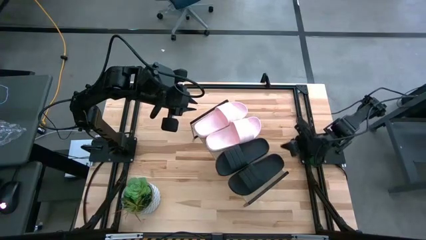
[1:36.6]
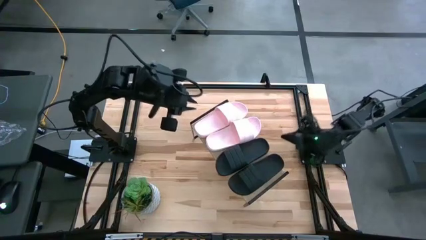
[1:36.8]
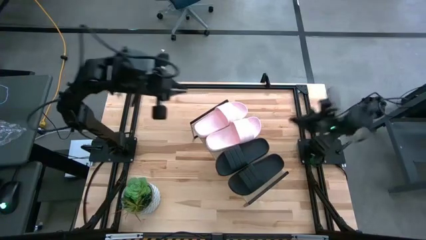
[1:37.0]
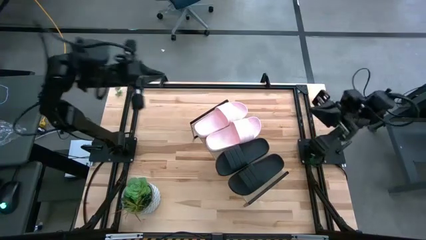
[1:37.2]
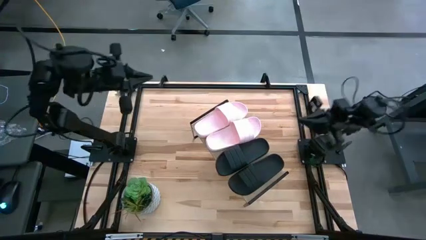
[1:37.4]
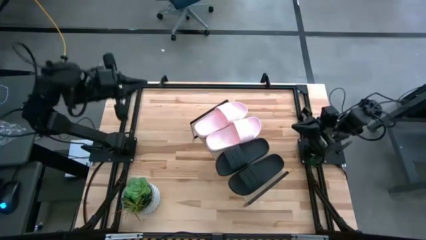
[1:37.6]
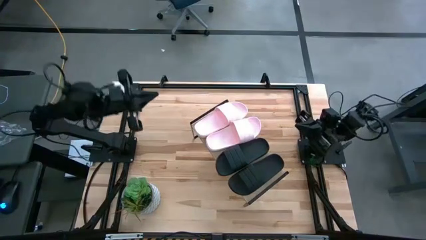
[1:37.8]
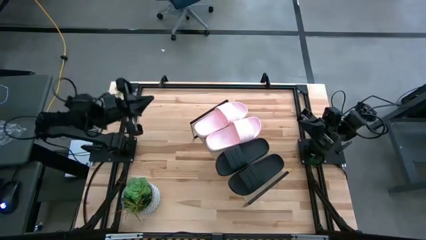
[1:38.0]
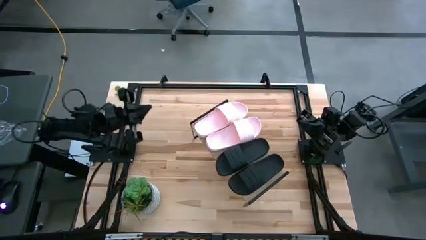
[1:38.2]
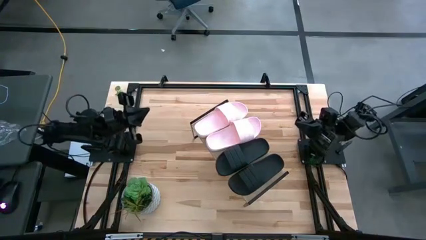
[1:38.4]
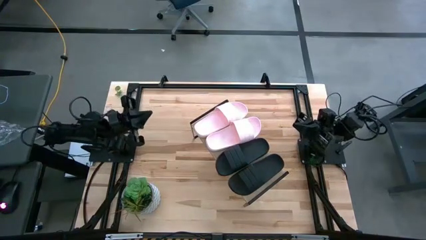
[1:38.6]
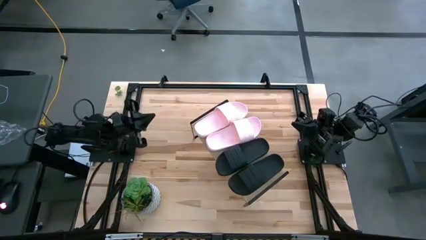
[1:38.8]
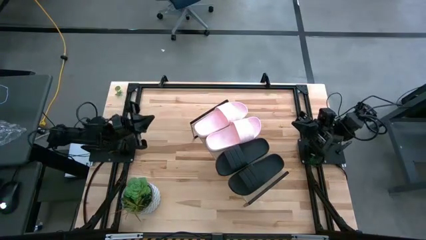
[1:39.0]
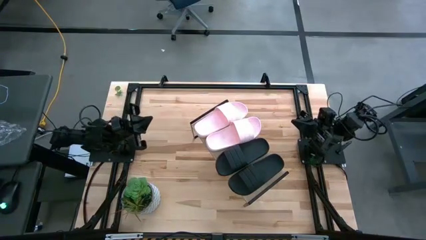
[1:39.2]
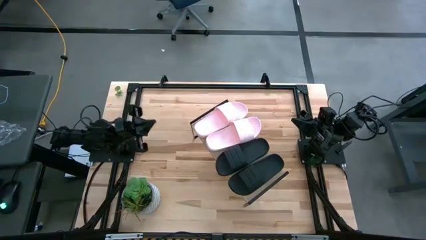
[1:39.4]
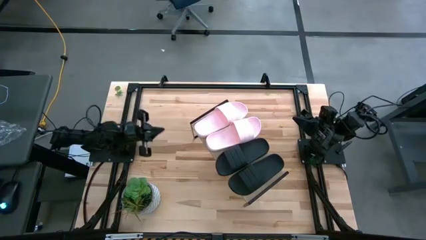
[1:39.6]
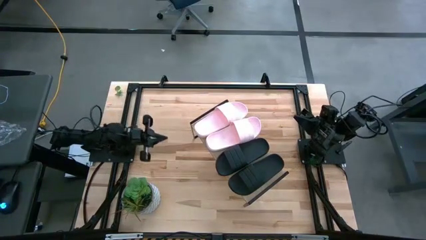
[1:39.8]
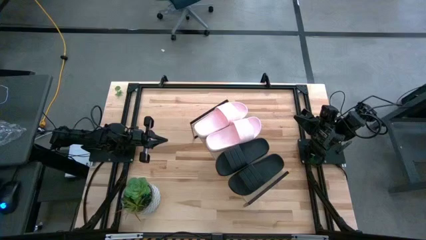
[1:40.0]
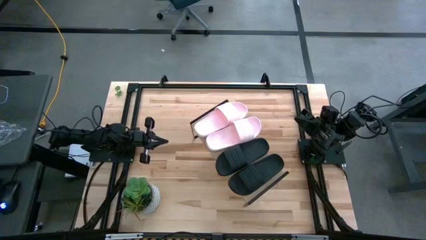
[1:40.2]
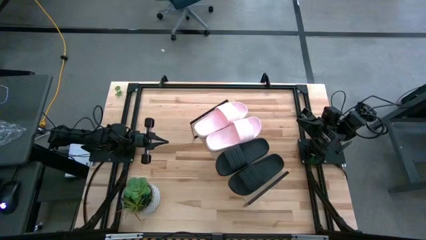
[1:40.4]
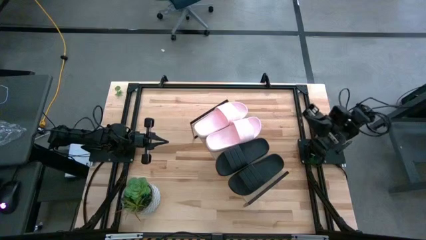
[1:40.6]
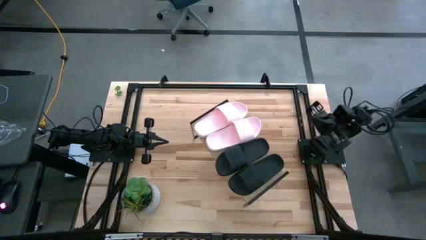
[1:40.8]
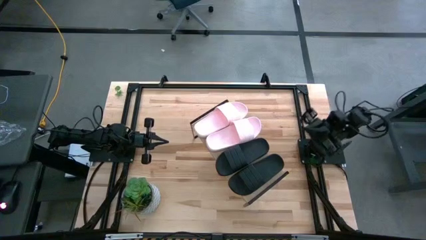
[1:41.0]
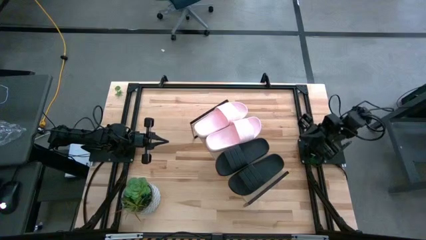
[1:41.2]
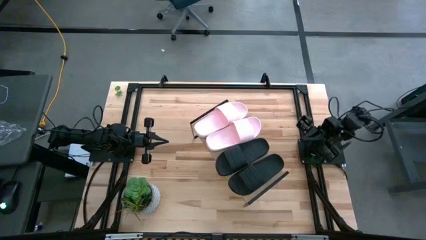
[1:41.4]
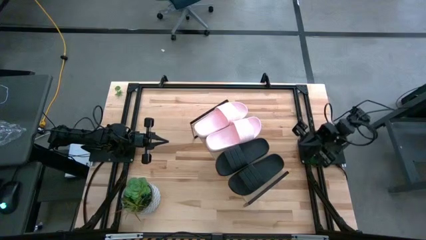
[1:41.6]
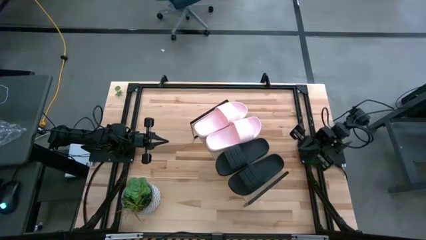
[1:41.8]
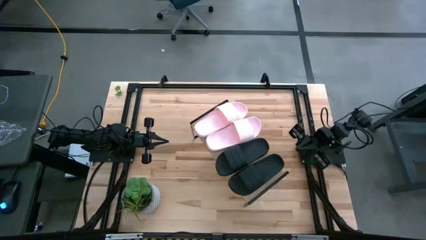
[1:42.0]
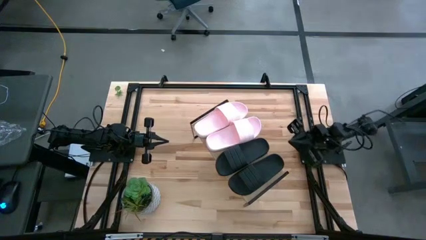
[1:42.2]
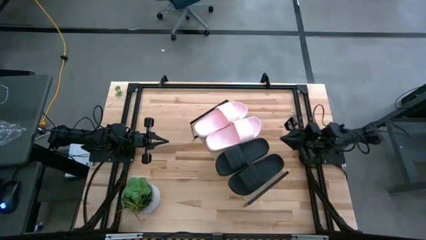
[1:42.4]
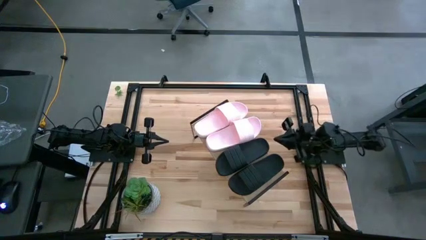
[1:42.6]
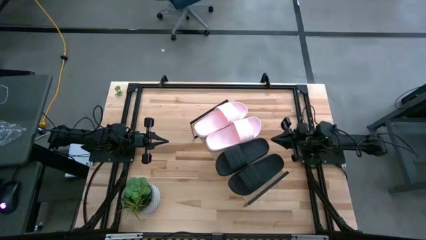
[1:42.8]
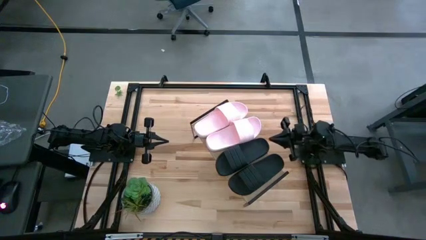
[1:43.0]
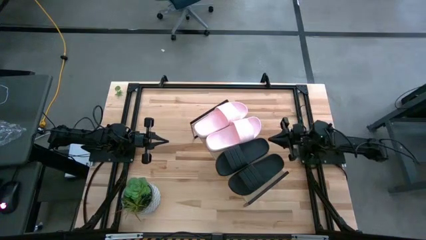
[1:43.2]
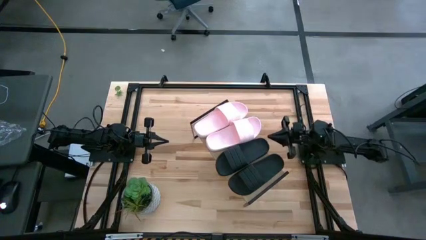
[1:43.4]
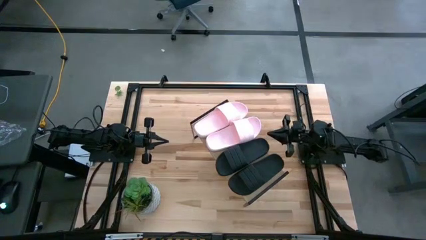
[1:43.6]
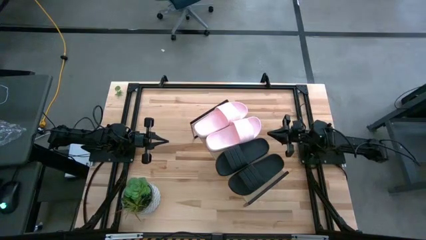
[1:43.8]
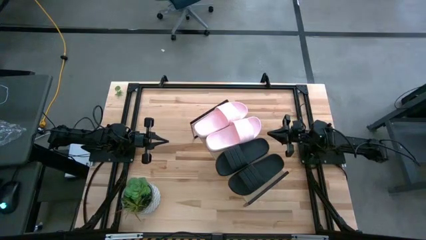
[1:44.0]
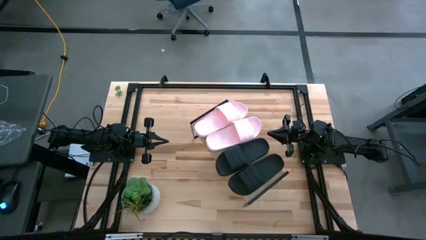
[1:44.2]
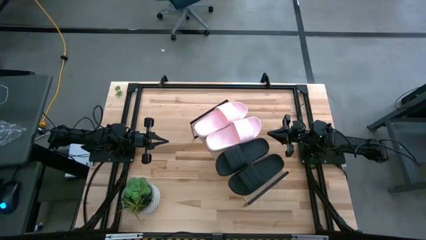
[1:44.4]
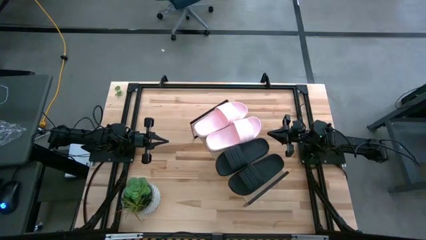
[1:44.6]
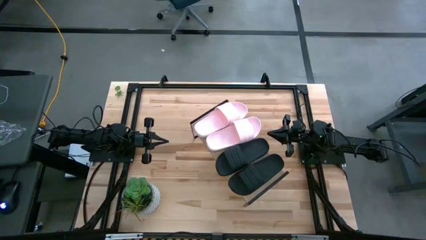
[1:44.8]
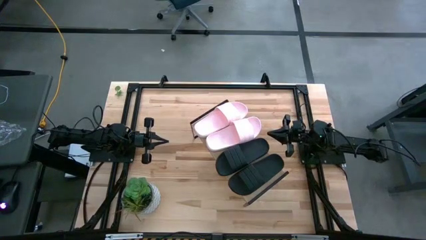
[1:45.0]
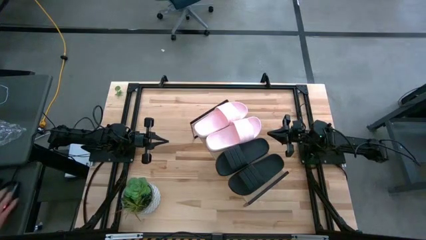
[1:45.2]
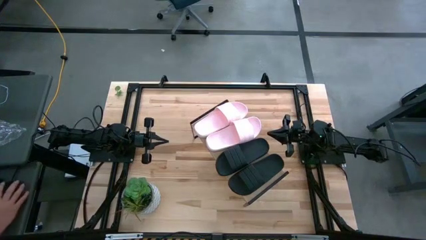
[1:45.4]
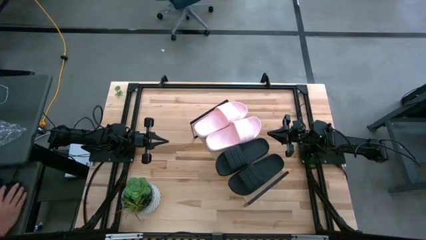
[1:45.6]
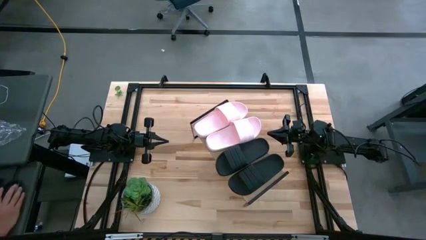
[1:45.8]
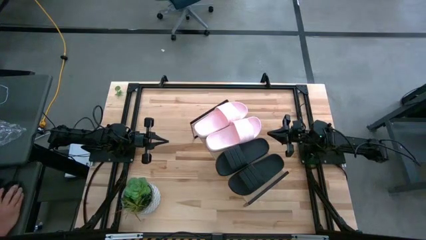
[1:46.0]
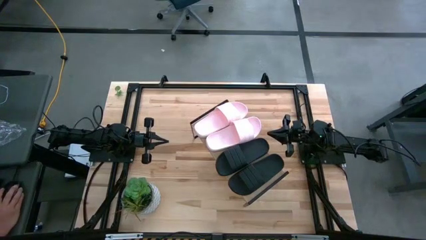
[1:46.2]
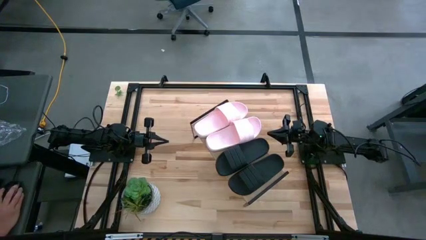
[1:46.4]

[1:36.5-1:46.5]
Task: Pick and place slides into the shelf
Return to Home Position

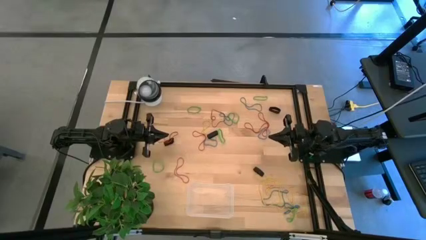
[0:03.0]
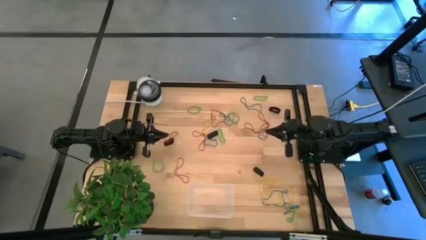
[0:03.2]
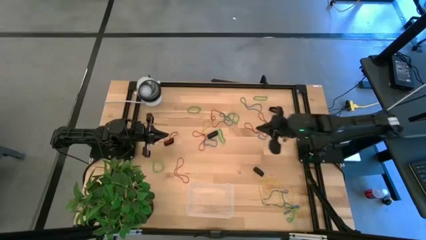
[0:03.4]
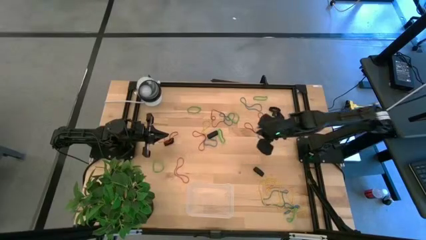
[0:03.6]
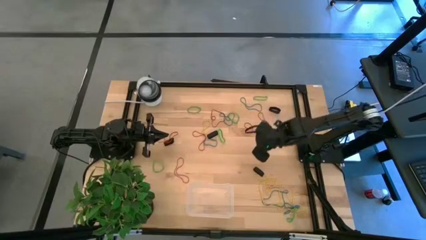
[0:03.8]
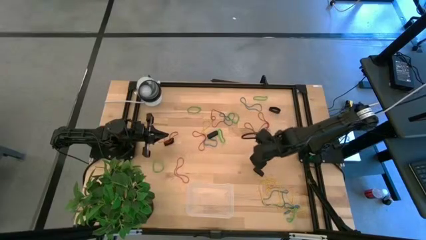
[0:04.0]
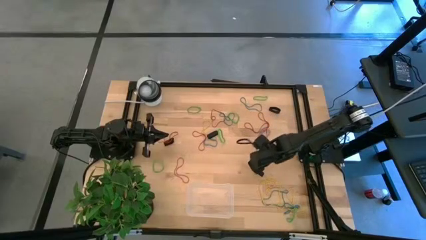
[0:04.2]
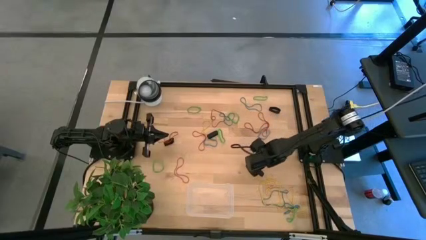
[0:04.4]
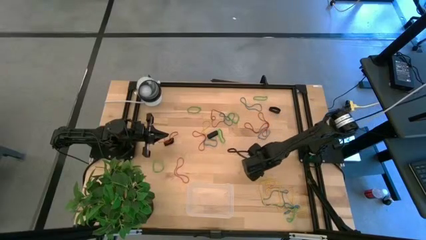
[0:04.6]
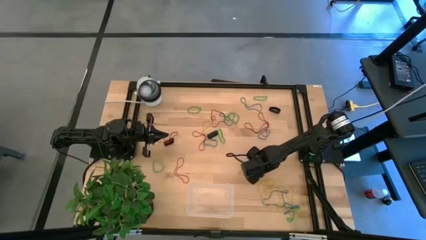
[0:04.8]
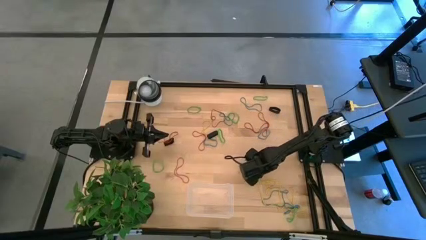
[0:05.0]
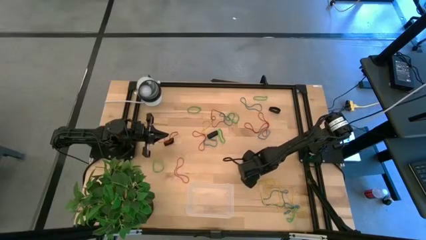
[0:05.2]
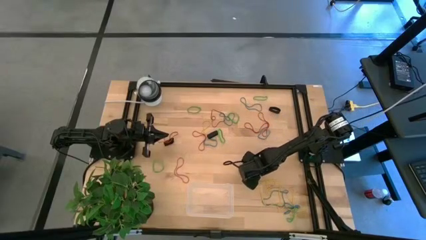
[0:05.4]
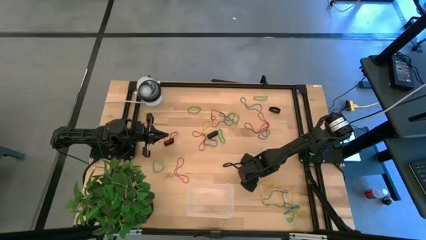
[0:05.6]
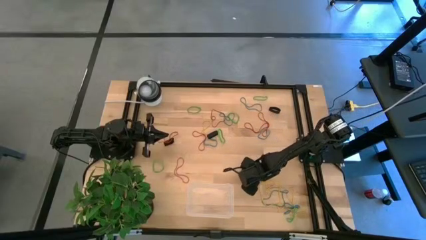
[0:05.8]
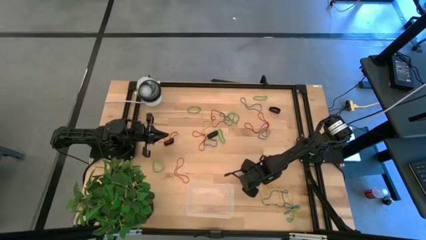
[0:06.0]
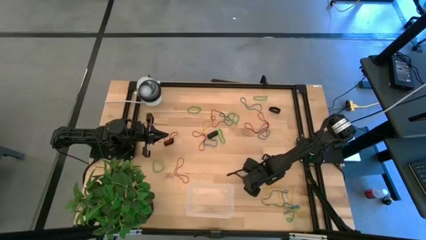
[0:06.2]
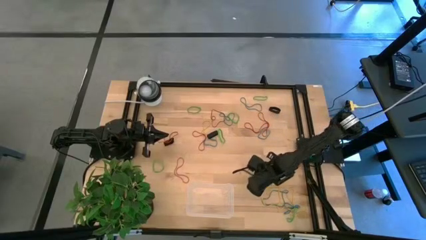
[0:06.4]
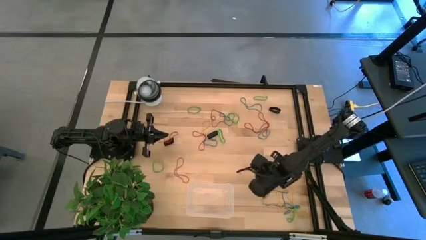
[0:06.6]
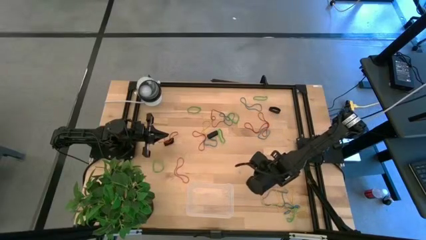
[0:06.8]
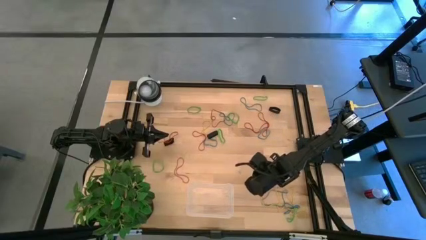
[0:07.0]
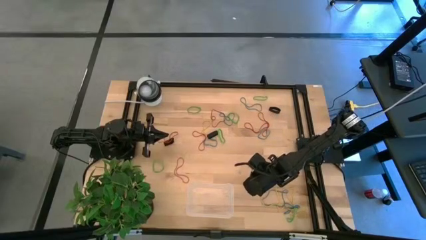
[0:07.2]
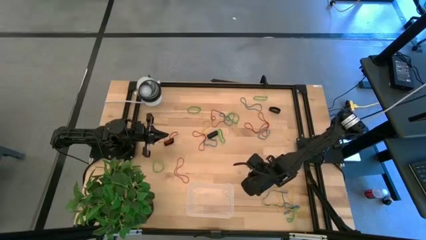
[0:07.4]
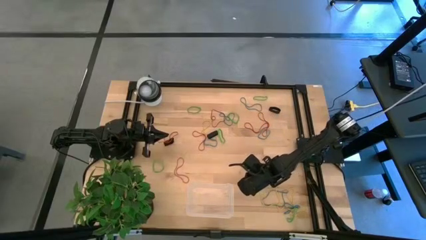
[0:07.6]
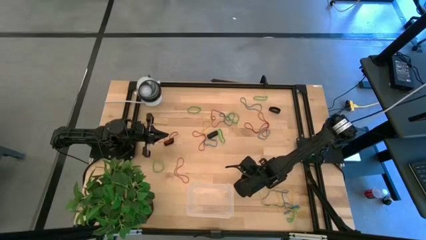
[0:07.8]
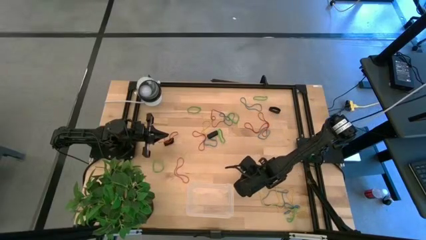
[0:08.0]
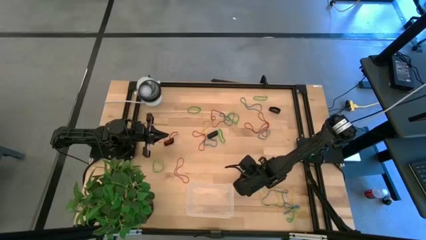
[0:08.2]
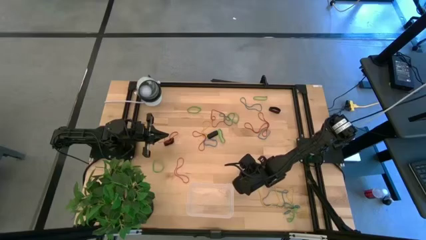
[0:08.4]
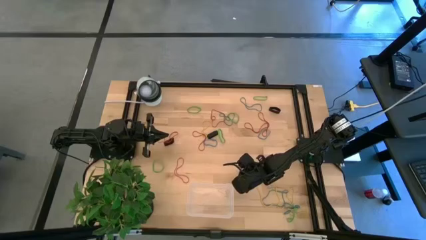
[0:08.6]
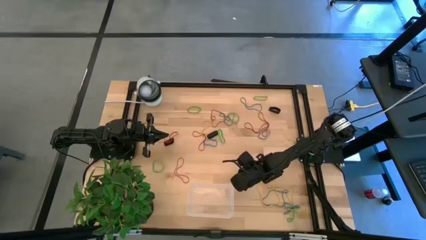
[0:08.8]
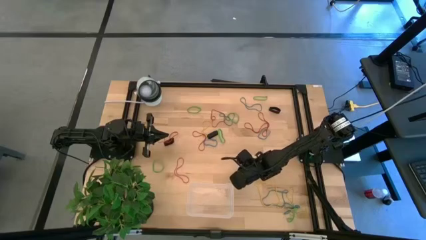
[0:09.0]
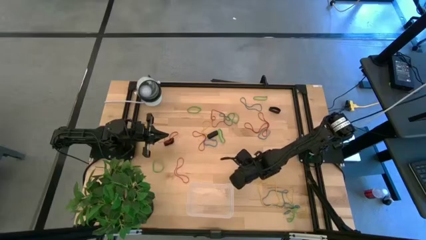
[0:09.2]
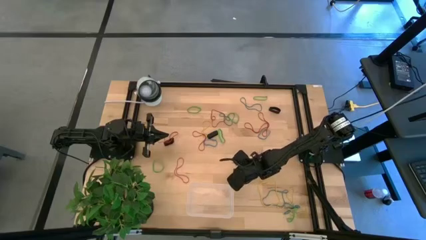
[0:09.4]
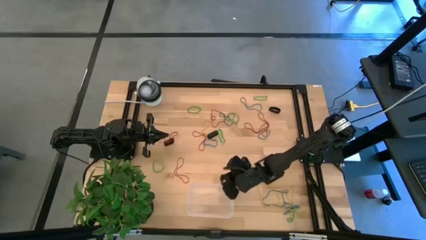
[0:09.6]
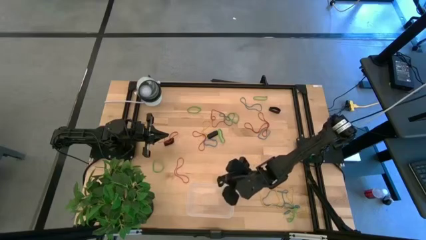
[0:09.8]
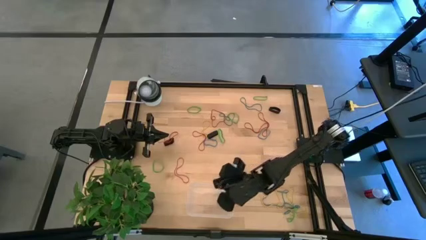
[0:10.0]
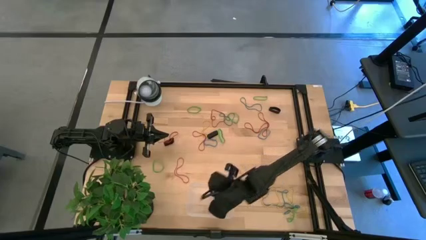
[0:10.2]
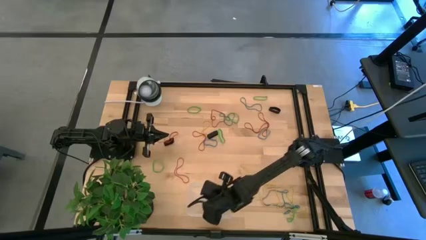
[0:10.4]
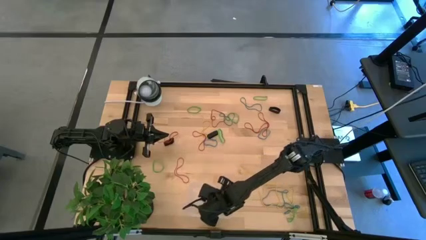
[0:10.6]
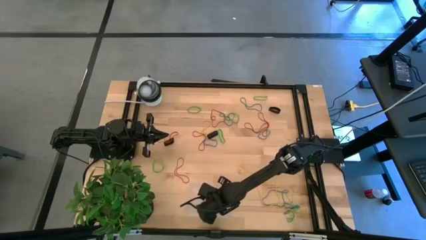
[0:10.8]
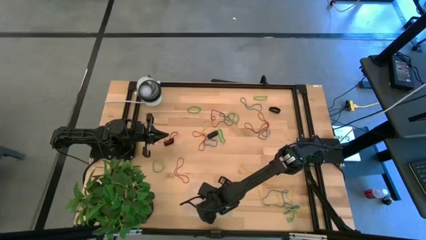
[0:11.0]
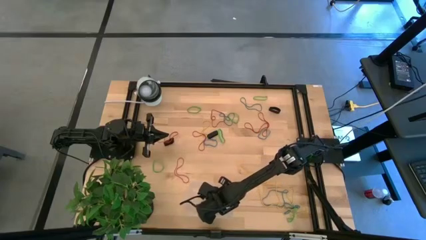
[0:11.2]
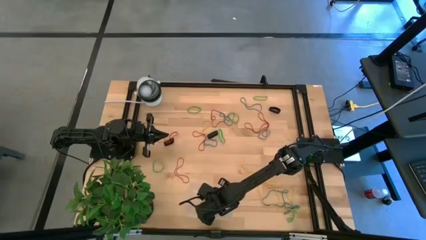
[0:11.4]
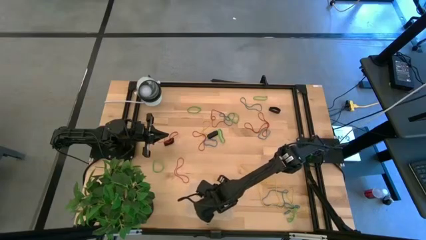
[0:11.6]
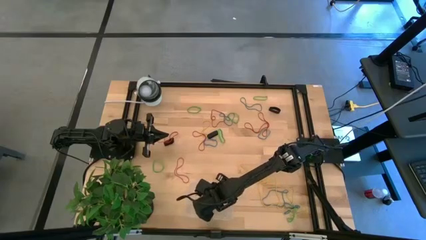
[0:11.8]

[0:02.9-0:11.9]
Task: Pick and place rubber bands into bin
Put the black rubber band into the transparent bin
